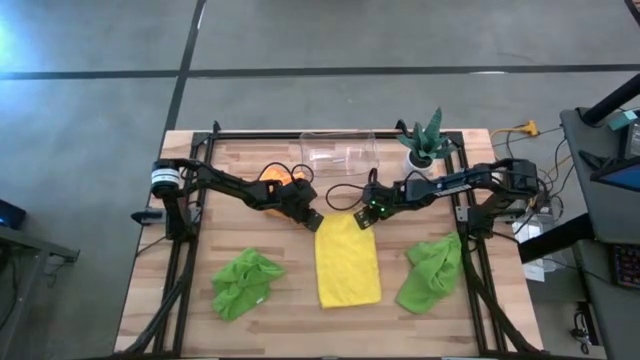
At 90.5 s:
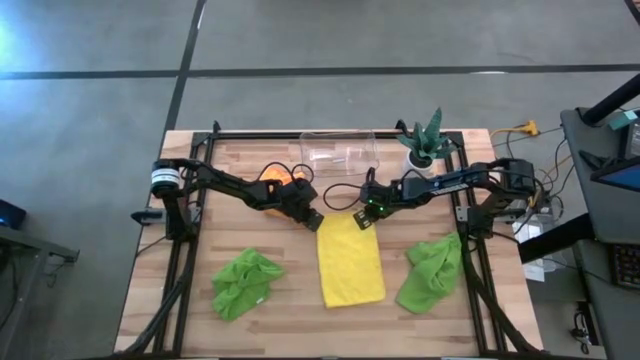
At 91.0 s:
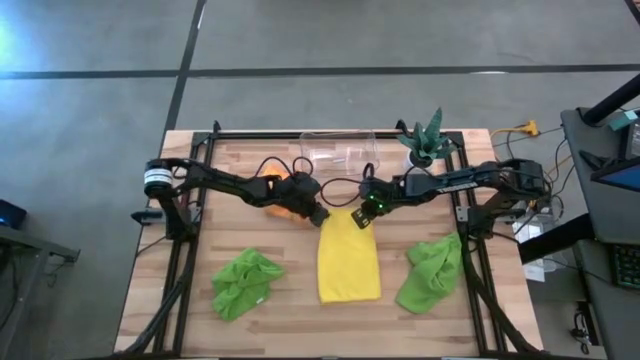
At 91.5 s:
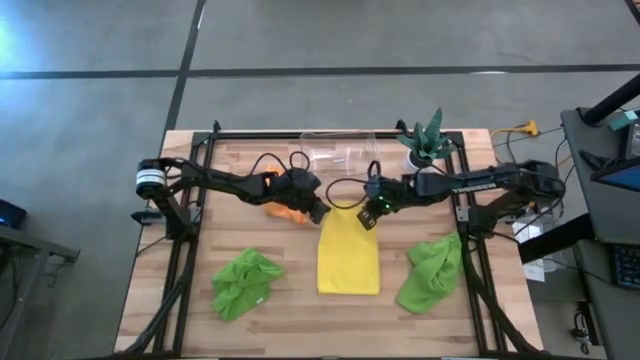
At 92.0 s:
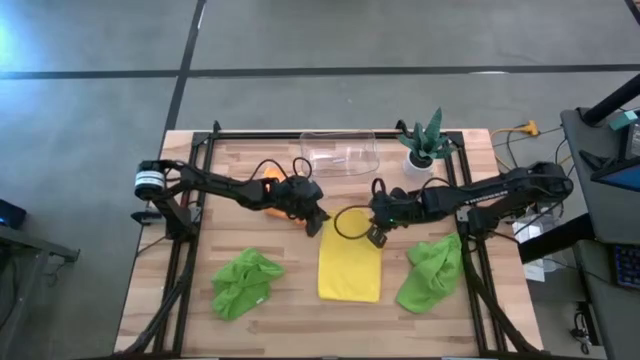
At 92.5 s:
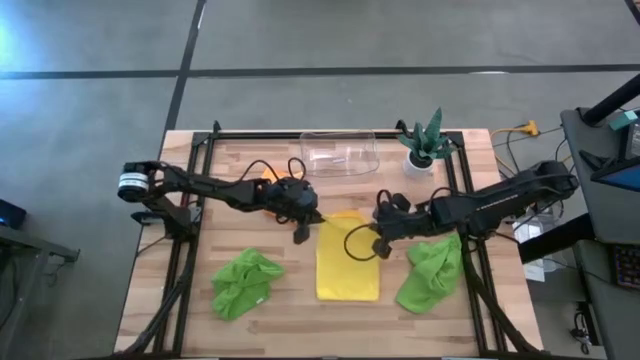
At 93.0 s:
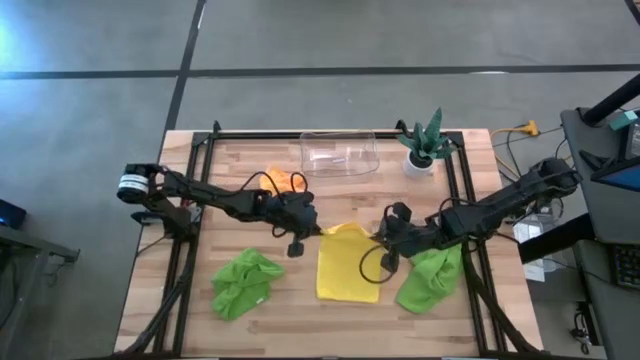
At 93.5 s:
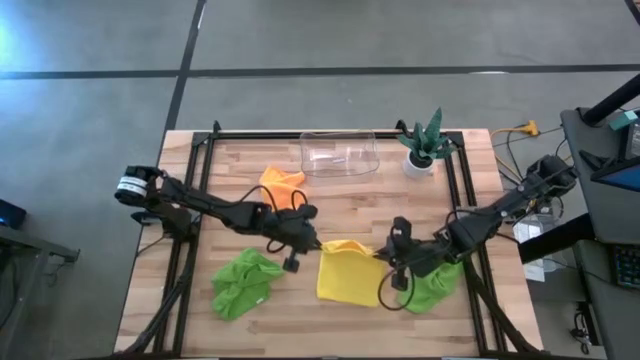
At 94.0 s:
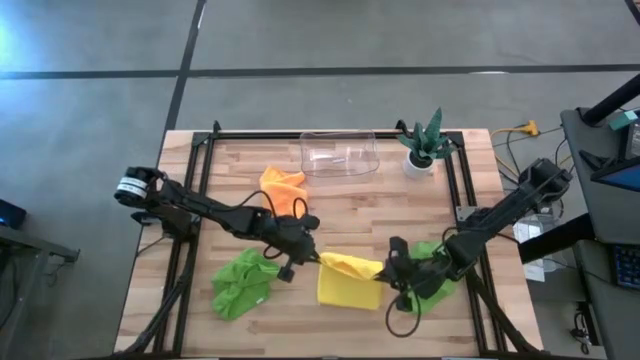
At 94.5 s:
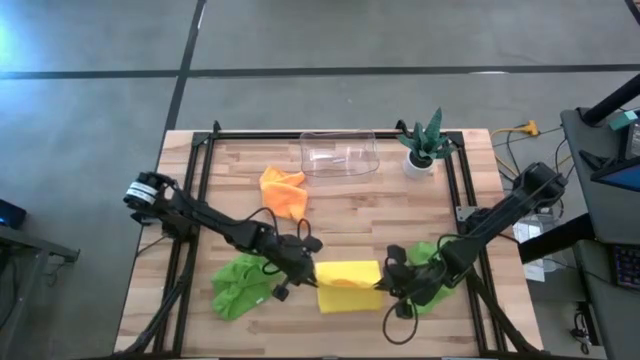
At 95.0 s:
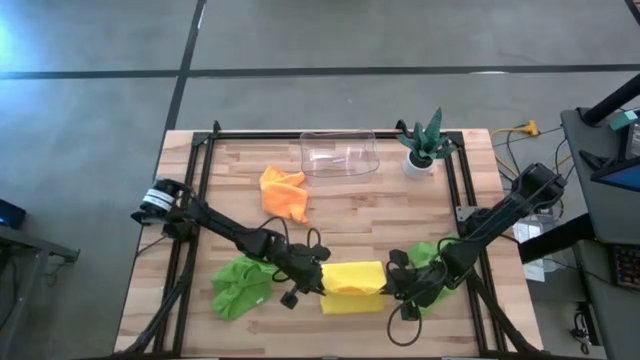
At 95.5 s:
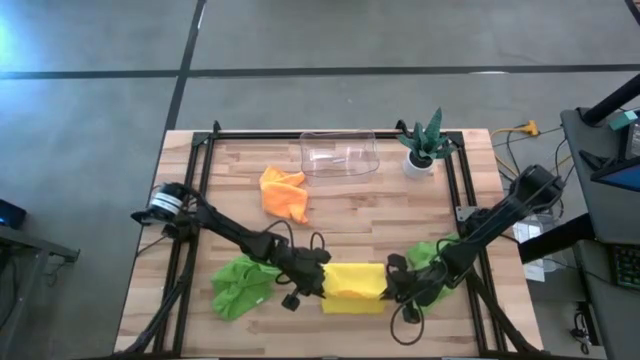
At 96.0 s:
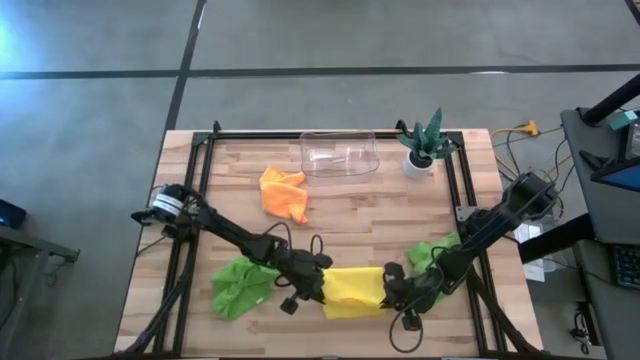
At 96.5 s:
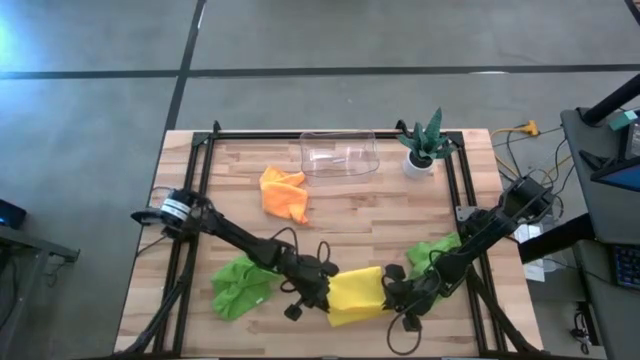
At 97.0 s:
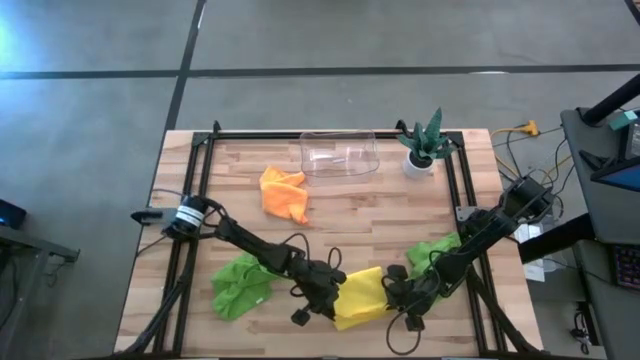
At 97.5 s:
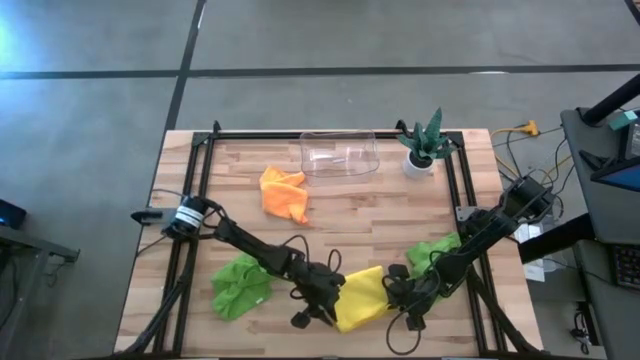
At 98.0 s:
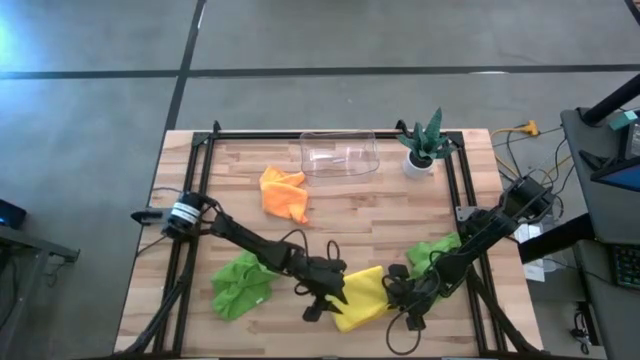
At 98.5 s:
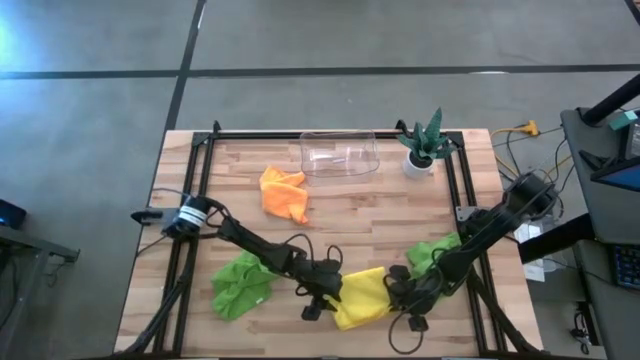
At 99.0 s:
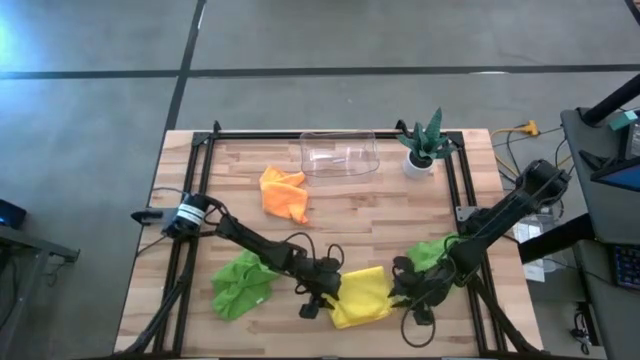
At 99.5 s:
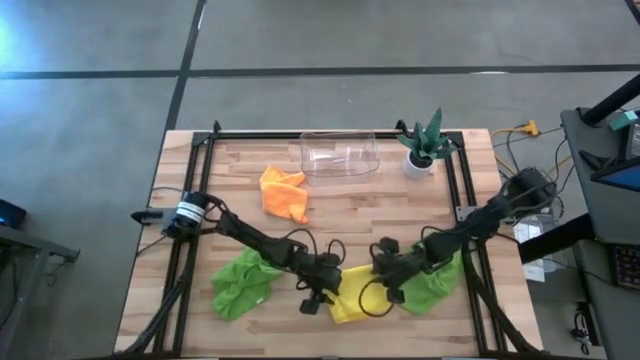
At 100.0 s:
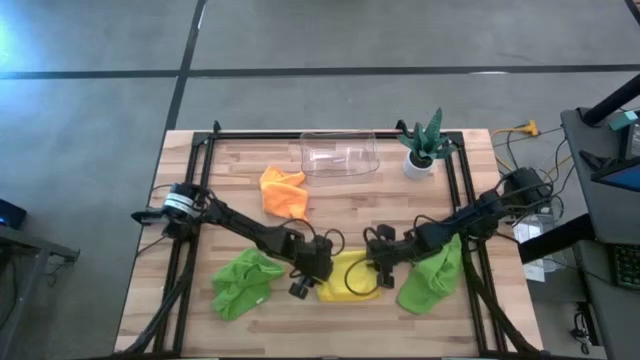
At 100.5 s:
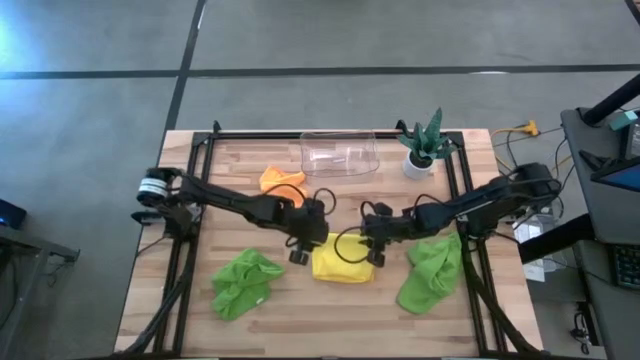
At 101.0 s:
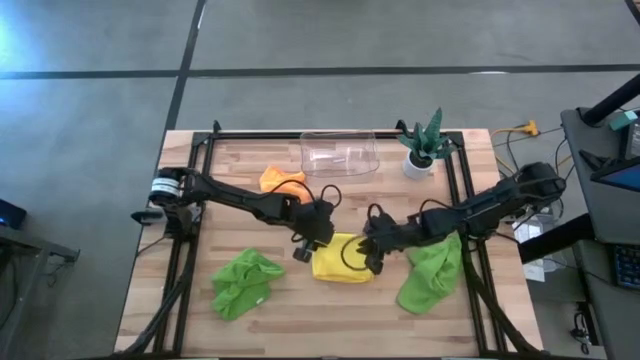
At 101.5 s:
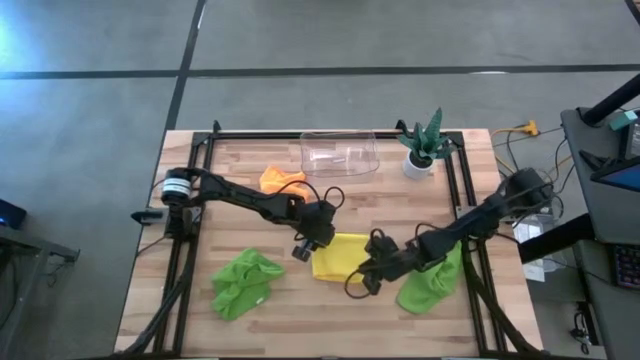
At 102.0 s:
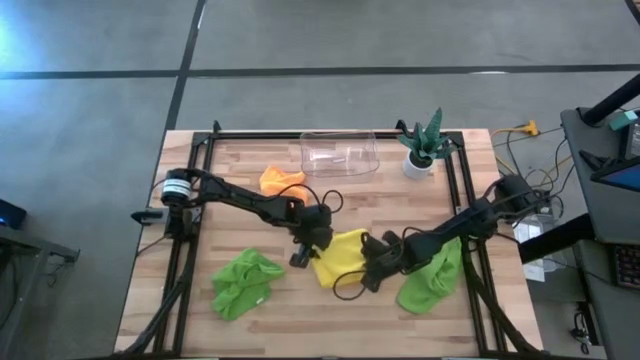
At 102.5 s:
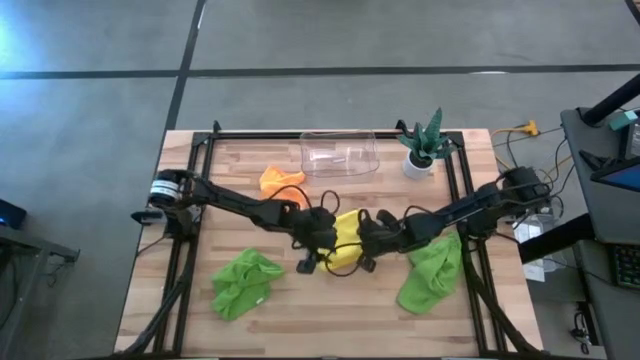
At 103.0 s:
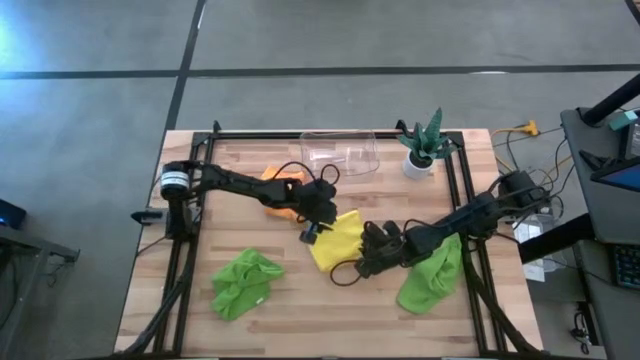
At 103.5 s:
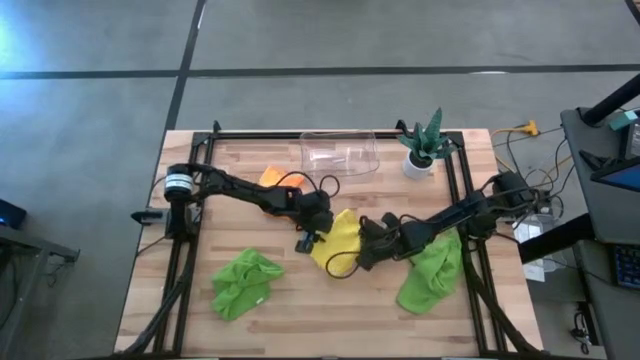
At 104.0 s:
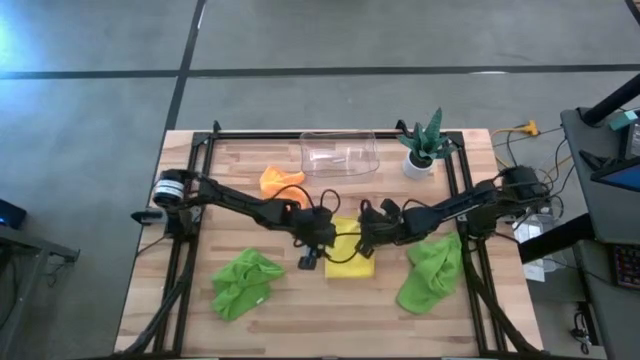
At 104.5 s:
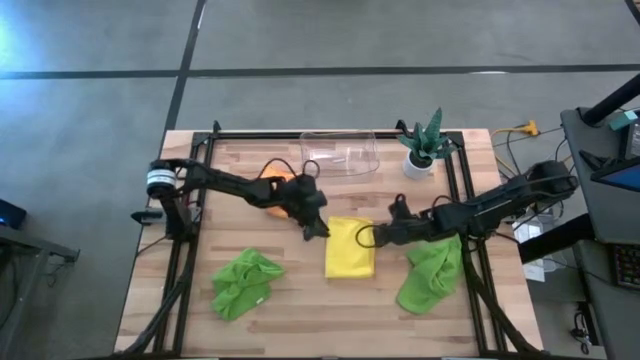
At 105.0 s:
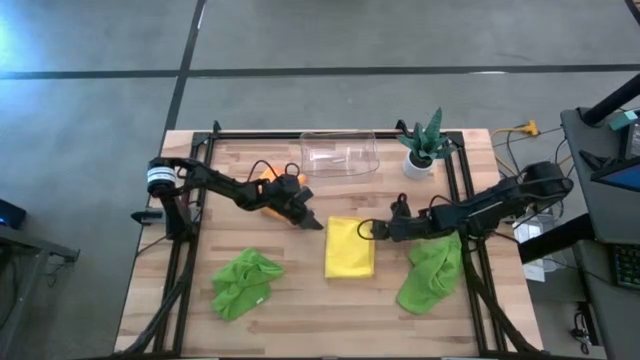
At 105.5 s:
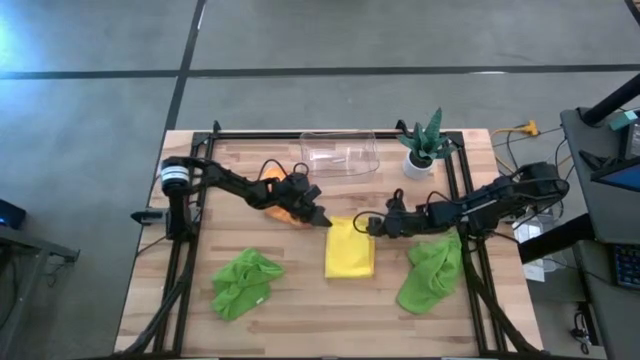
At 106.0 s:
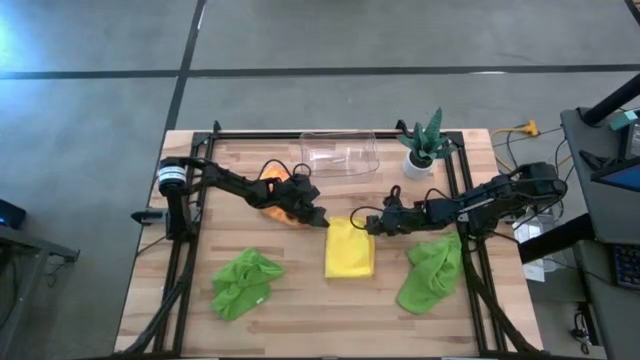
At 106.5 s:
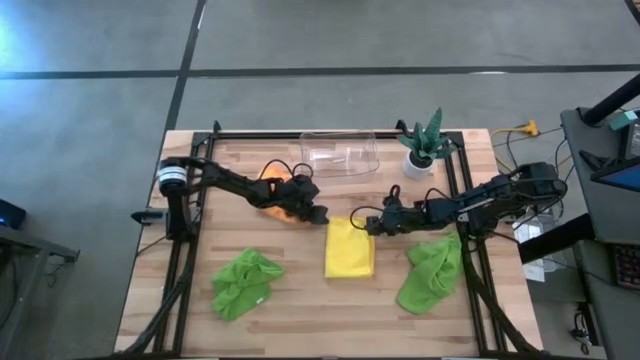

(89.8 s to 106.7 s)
Task: Fold microfiber towels
Fold the yellow microfiber towel

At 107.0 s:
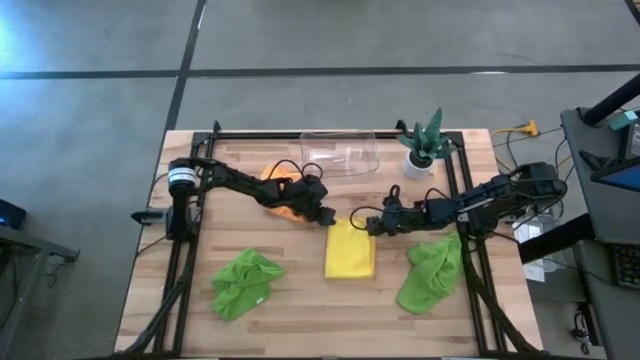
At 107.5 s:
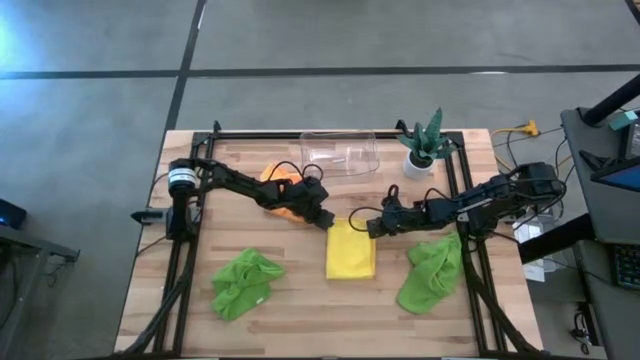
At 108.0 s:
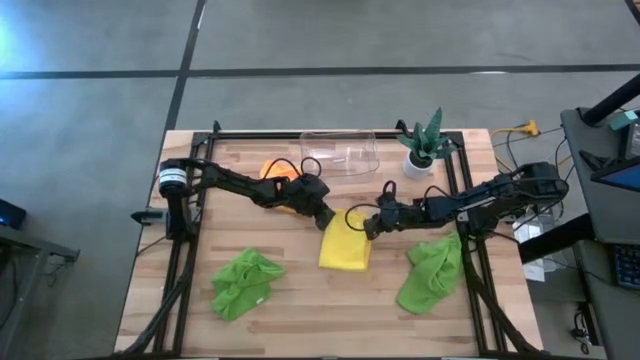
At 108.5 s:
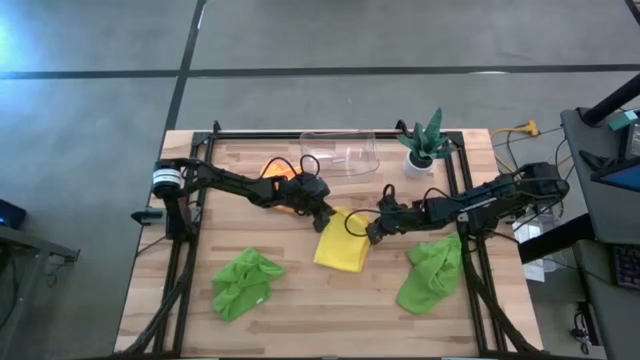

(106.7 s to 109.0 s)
Fold the yellow microfiber towel

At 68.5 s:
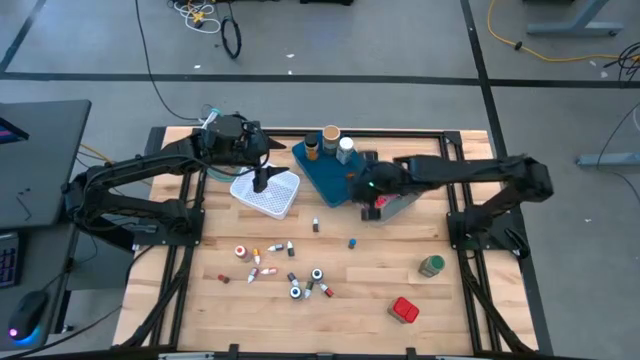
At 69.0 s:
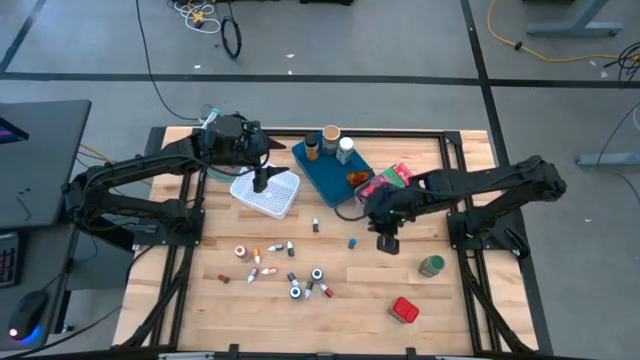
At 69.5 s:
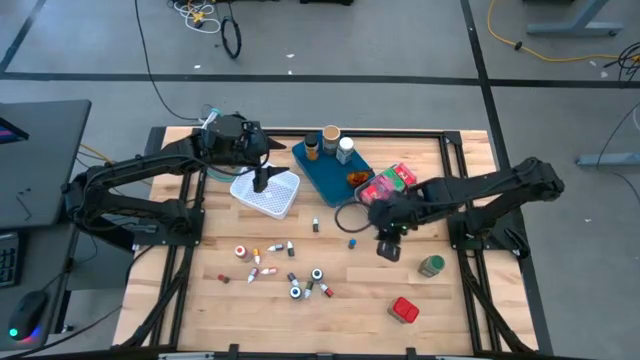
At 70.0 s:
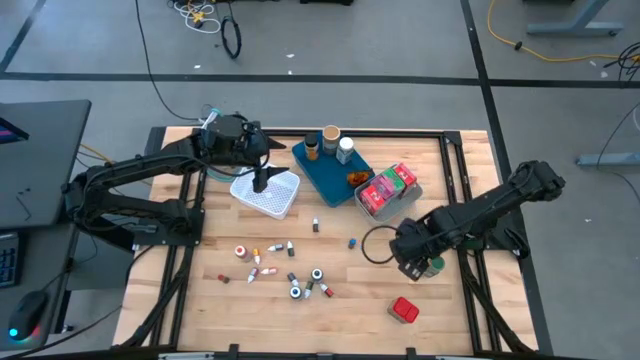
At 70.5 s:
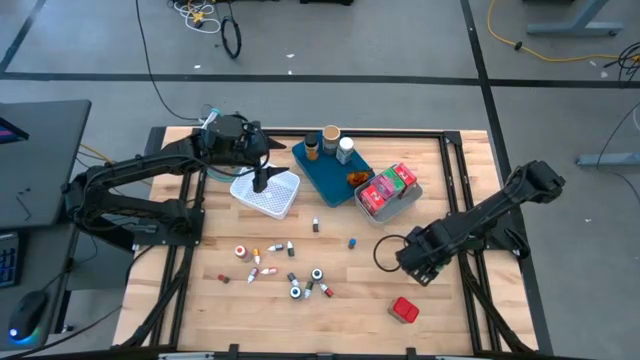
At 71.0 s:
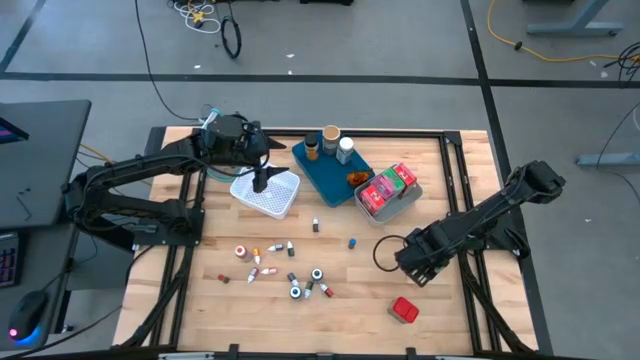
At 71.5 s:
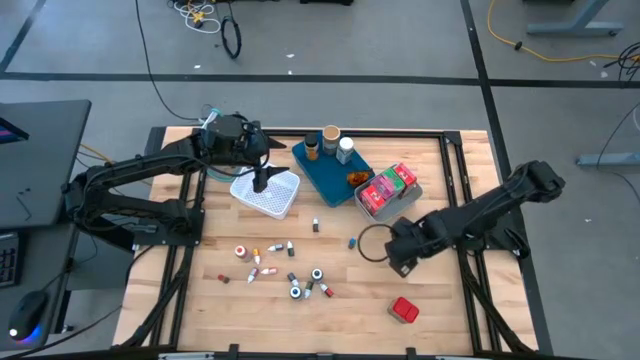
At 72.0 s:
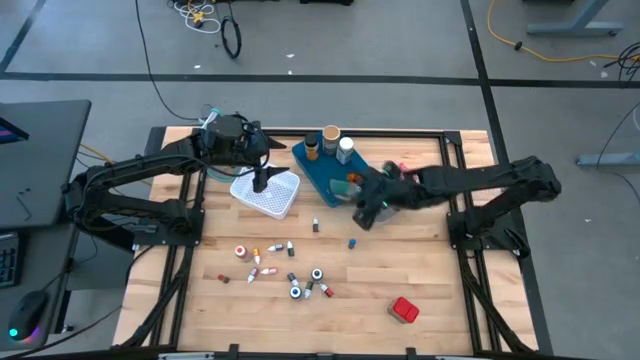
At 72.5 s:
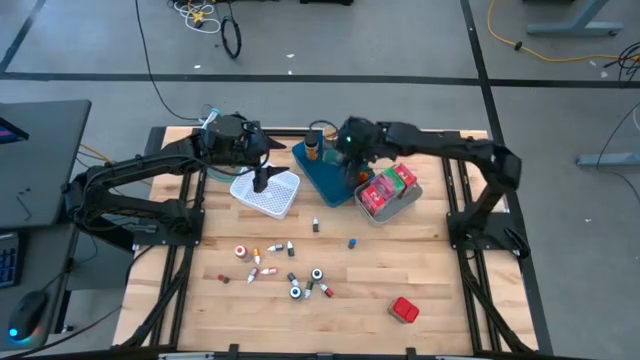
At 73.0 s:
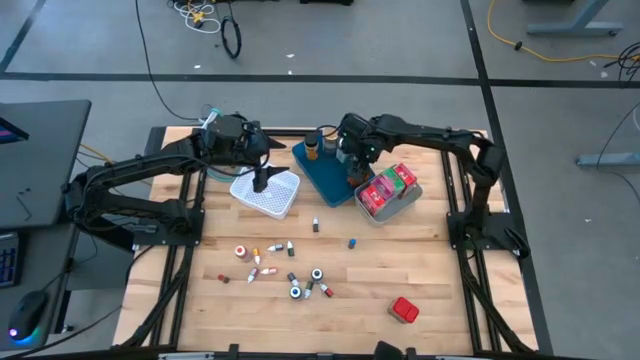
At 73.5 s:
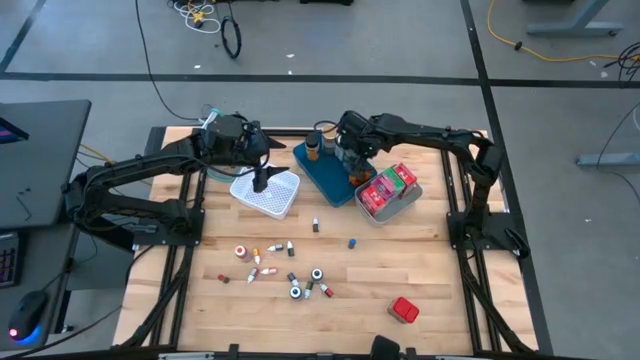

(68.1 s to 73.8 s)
Task: Pick & Place Kitchen Items
Put the green seasoning bottle into the blue bin
